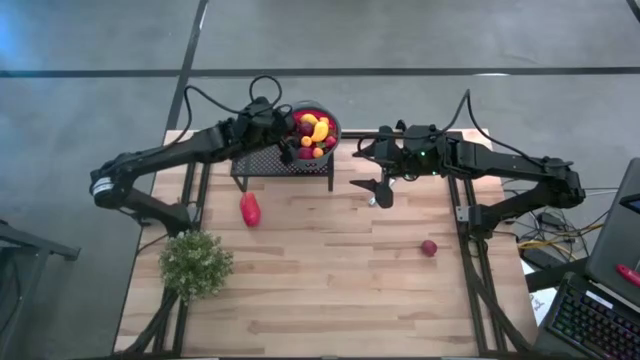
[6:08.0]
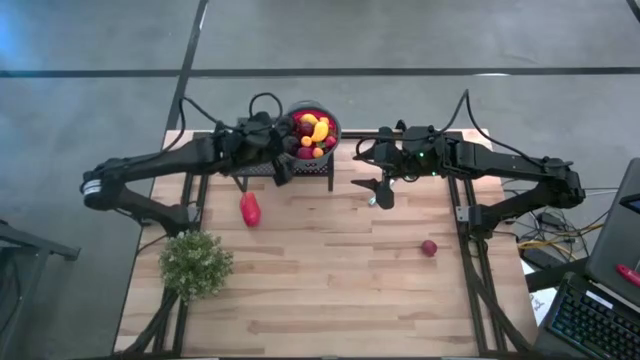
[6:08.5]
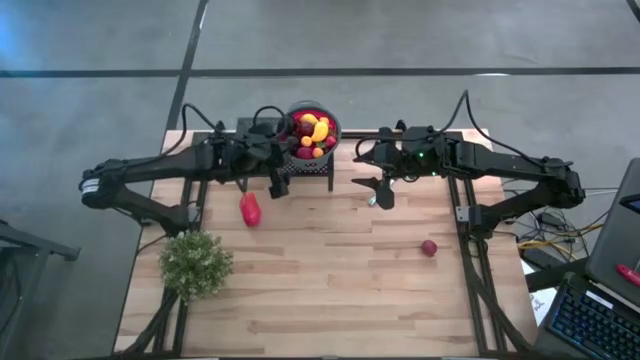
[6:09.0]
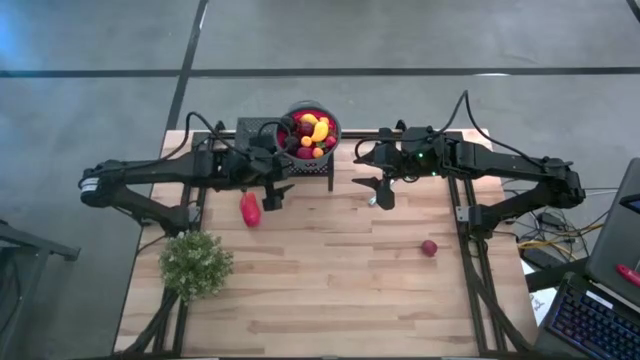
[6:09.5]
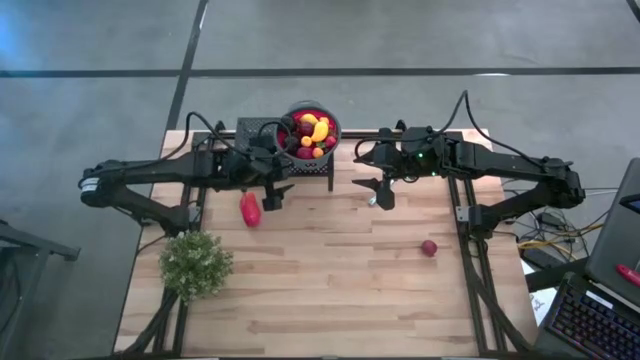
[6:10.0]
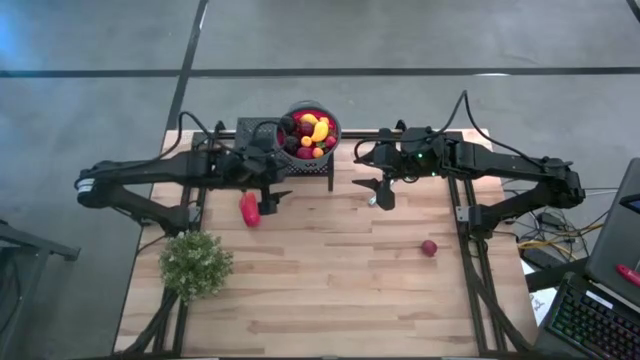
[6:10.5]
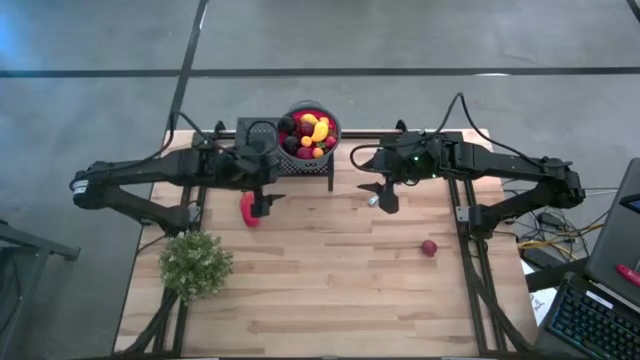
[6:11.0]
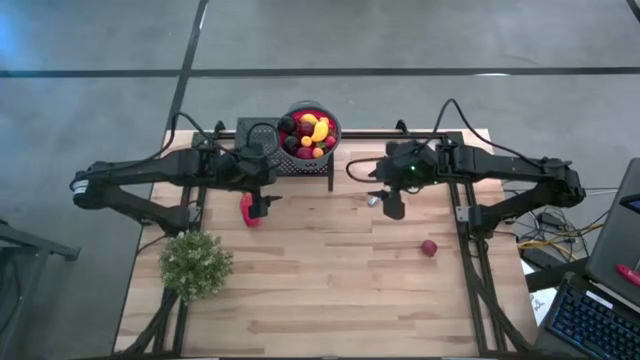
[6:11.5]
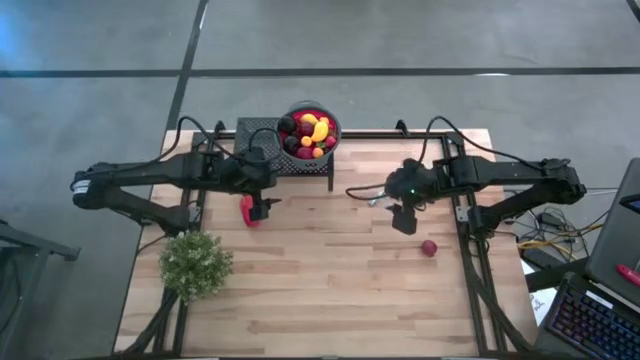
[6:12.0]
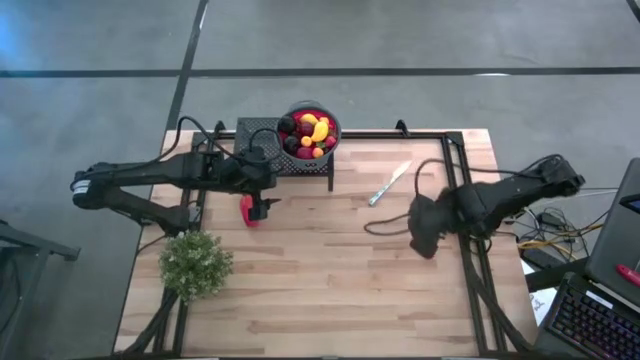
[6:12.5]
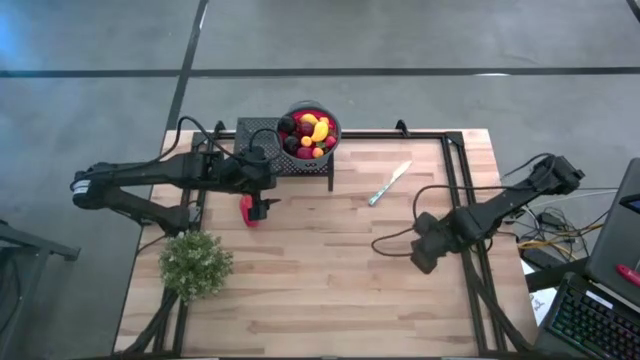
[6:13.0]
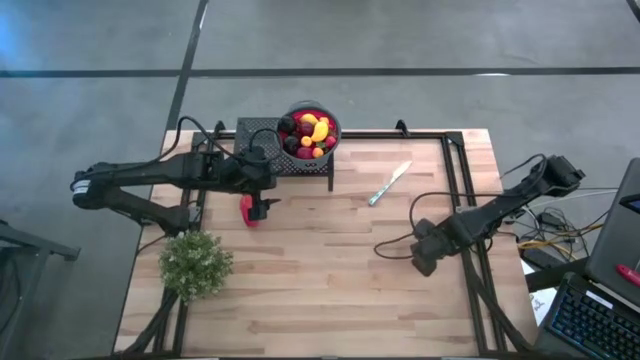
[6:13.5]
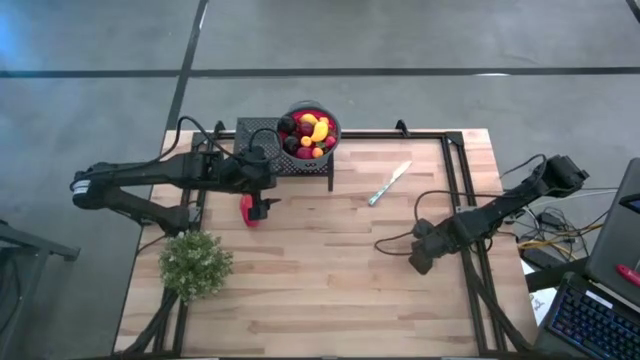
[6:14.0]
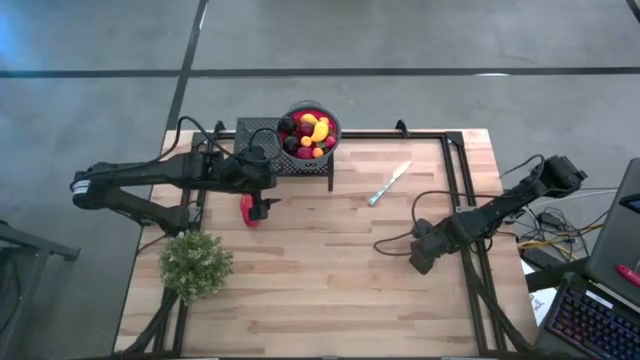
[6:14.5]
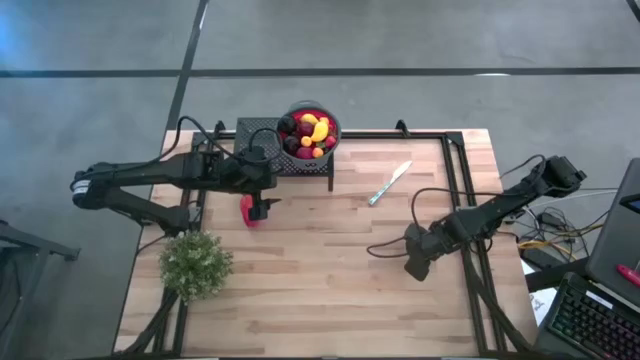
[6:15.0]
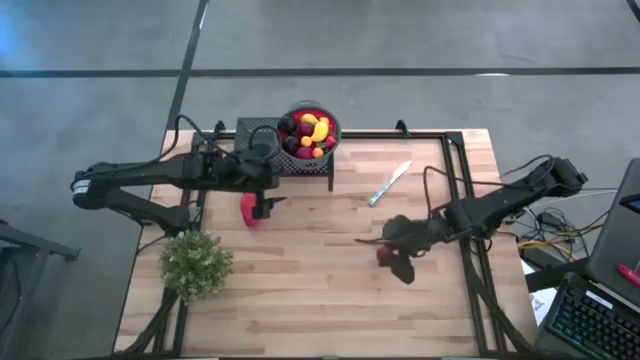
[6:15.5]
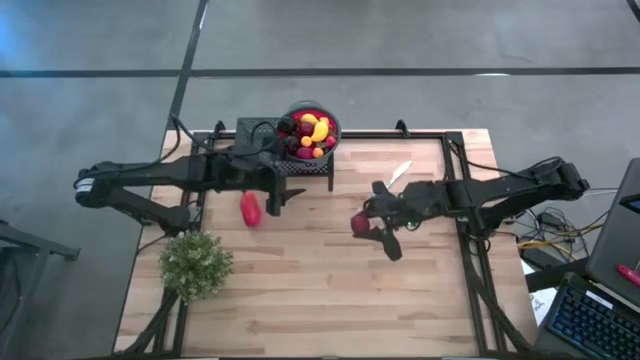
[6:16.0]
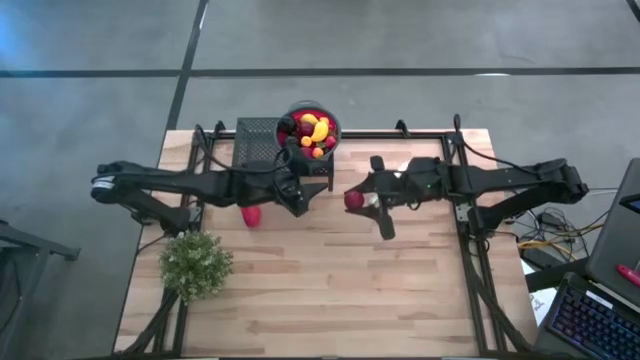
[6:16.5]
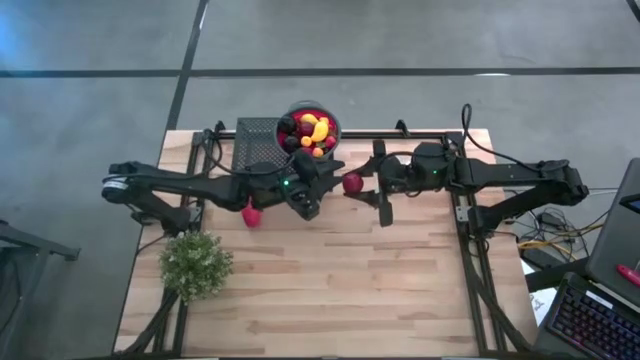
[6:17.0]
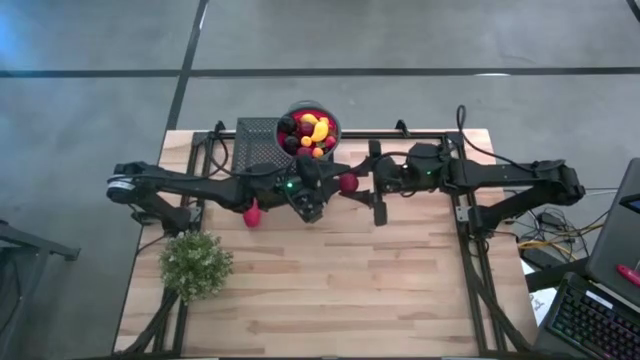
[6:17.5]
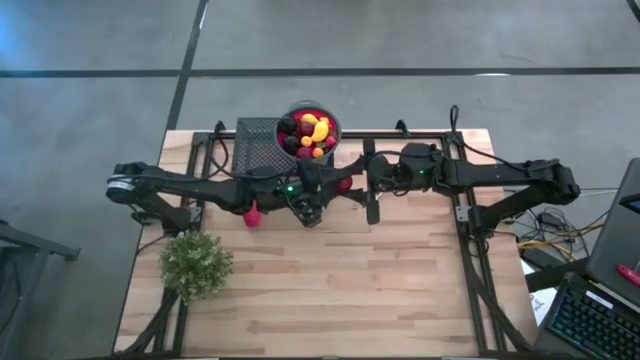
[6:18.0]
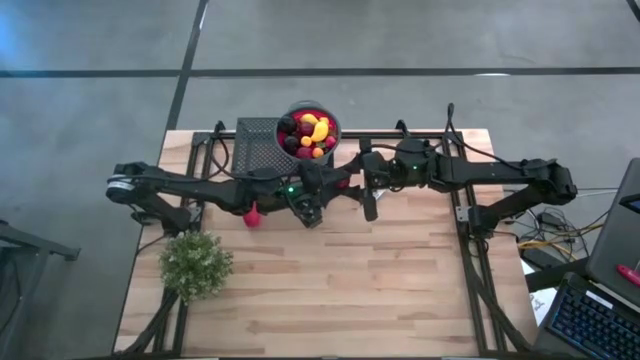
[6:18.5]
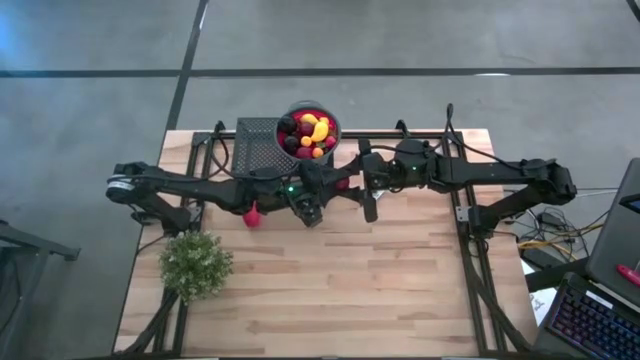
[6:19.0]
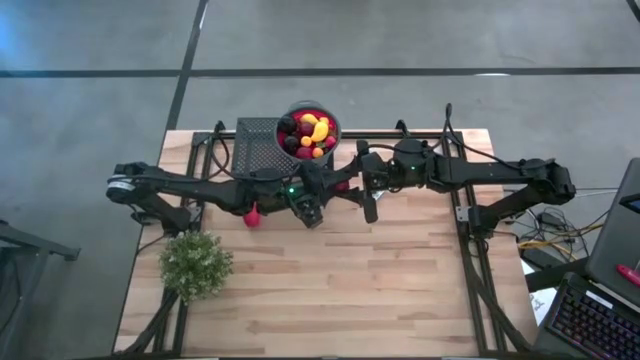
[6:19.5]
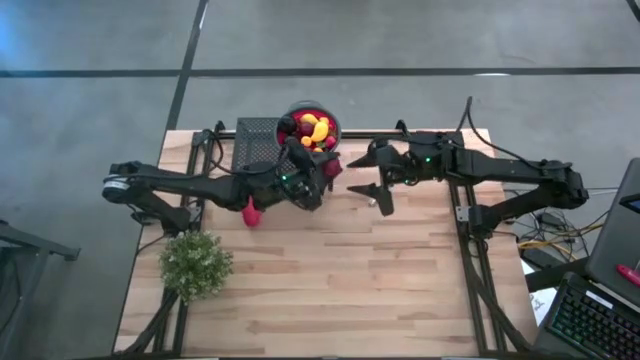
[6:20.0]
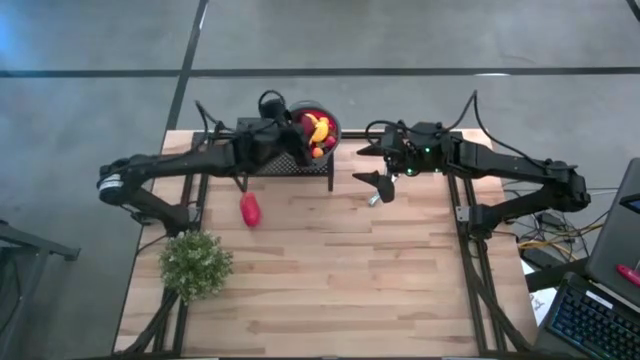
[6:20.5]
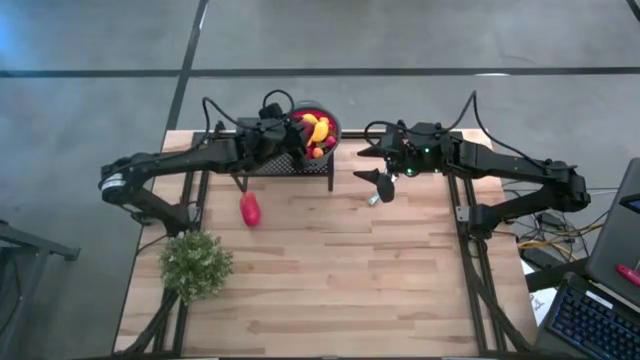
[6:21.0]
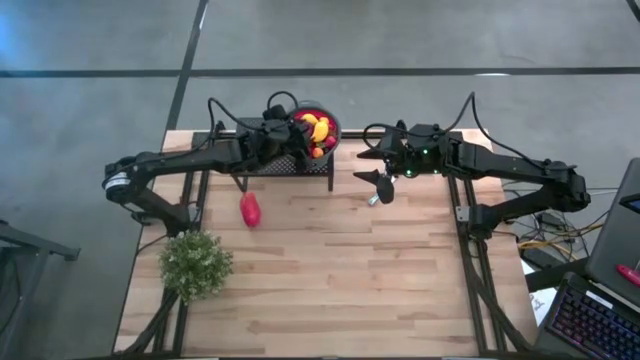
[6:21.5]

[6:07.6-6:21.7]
Task: Pick & Place Fruit
Put the red pomegranate into the red gray strainer bowl on the shelf

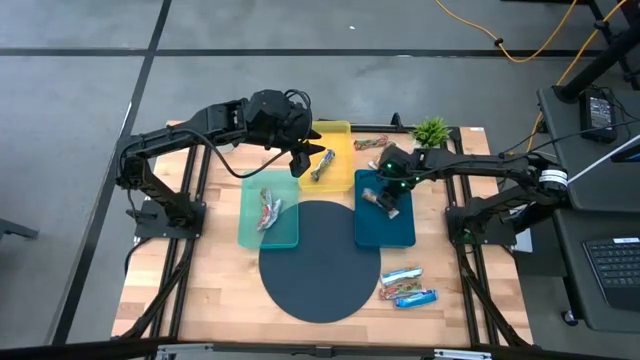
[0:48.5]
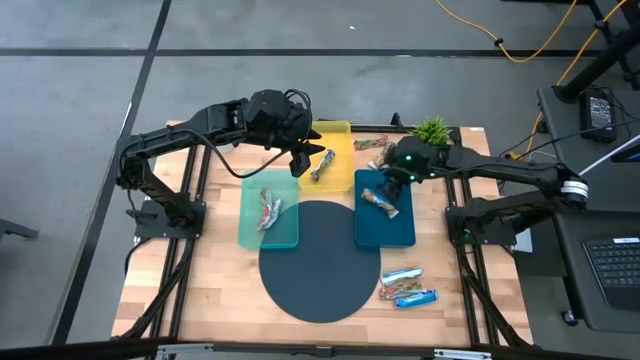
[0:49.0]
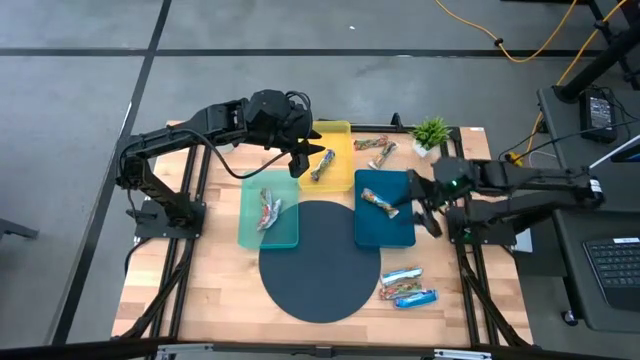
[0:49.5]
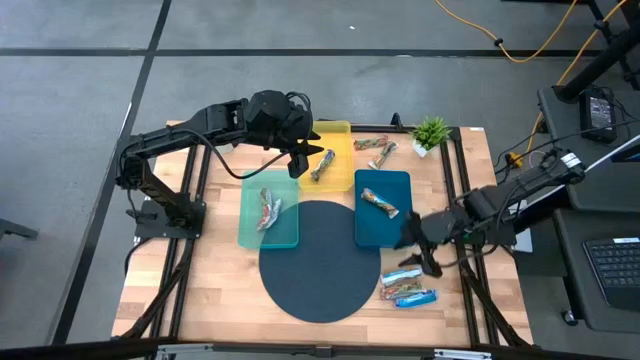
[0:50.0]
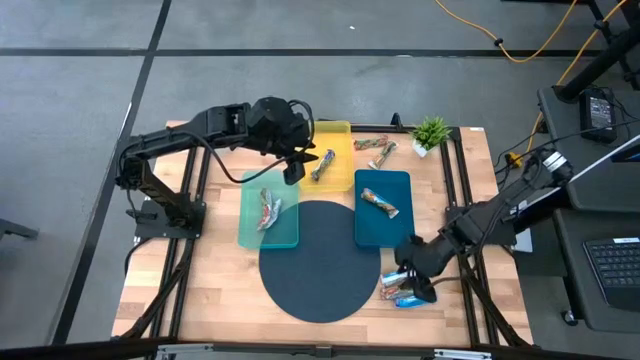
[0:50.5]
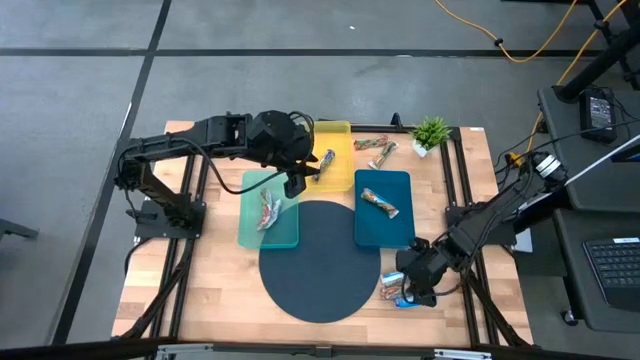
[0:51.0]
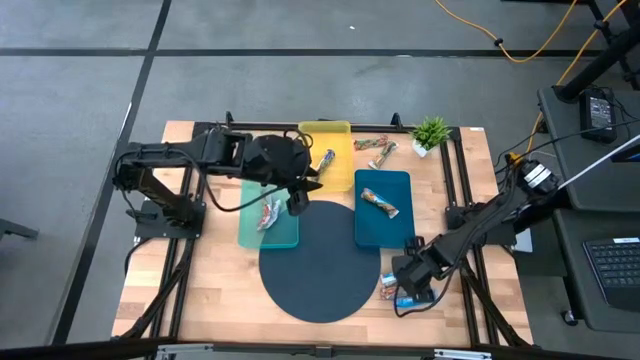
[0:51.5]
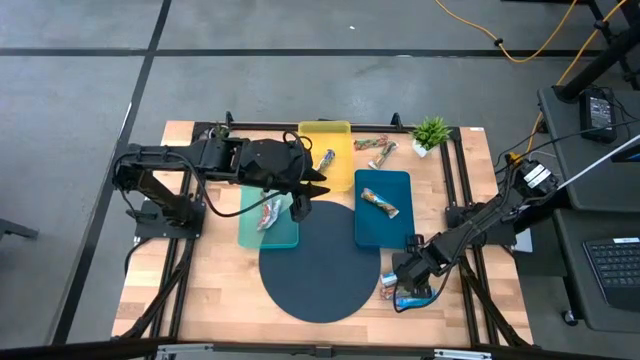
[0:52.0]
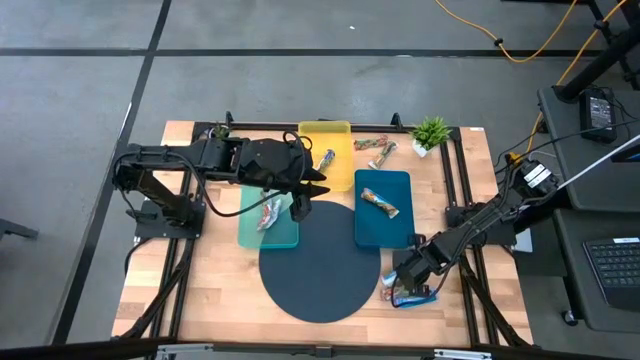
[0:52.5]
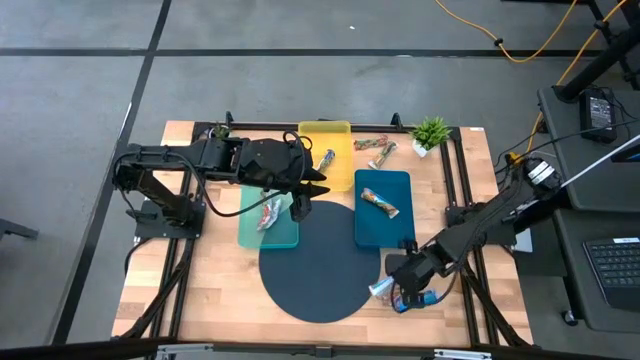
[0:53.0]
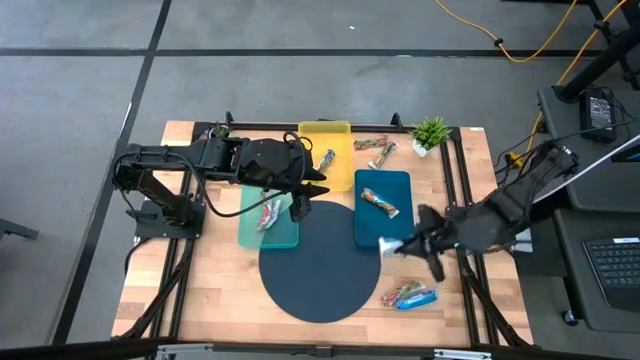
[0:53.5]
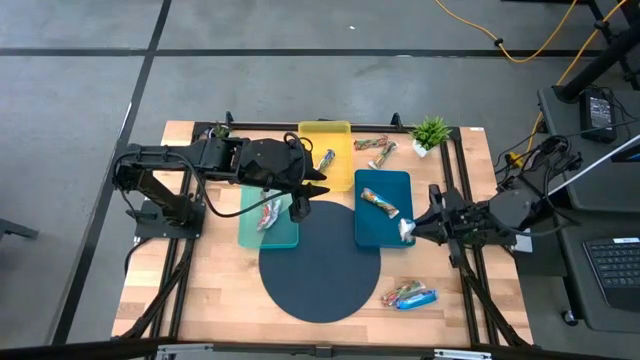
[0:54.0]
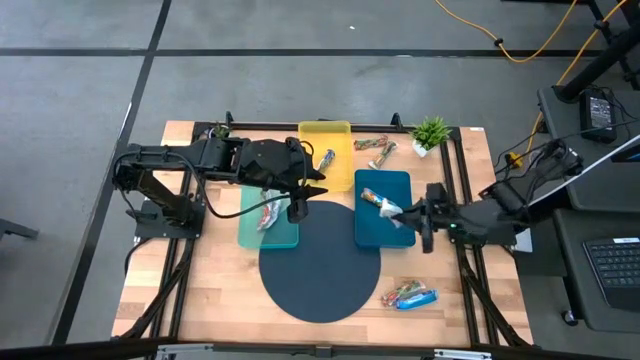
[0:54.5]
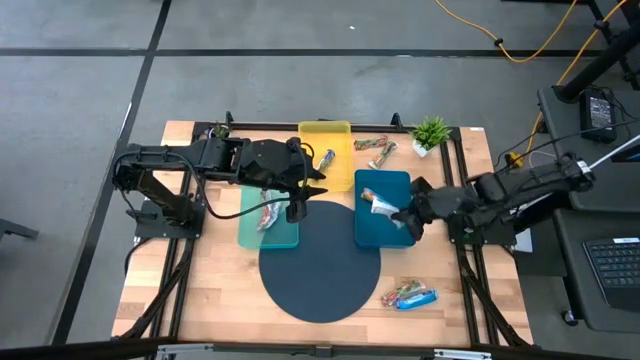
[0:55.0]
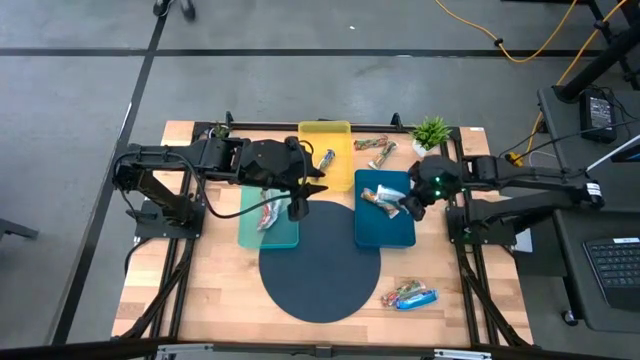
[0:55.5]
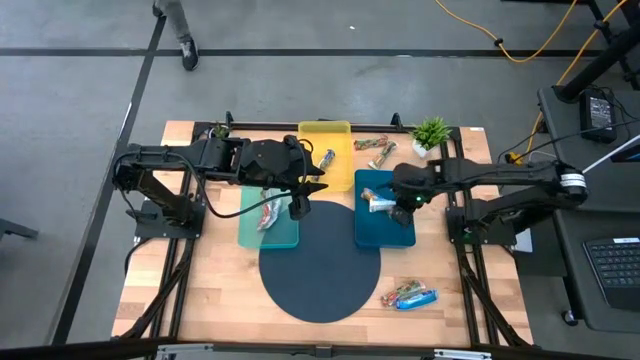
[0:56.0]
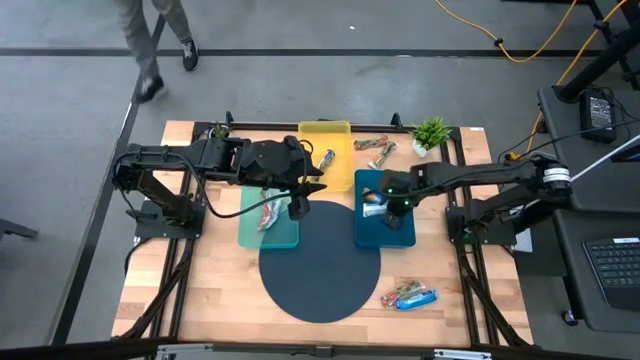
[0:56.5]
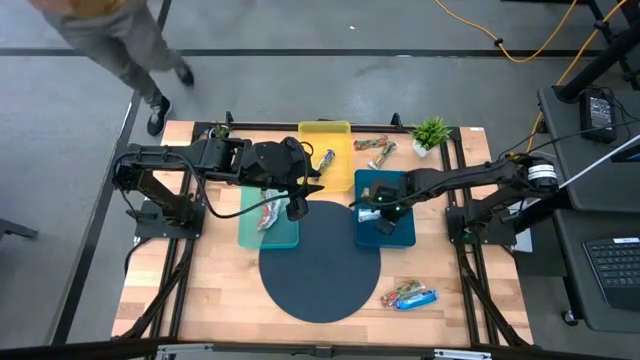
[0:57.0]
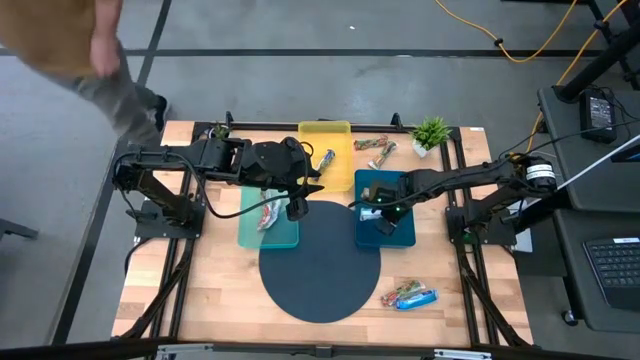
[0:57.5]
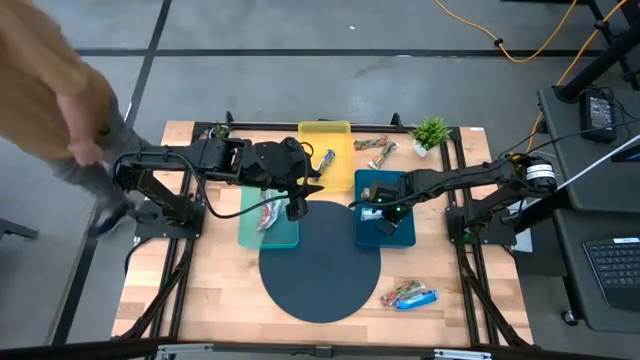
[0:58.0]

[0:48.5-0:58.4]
Task: Pick and place Granola Bars by type
Put the orange granola bar into the blue bin
